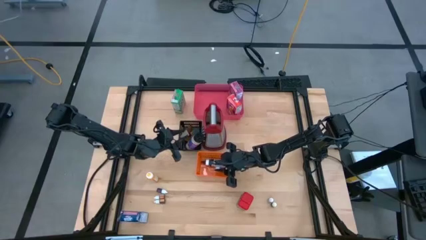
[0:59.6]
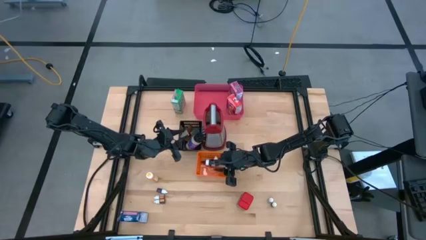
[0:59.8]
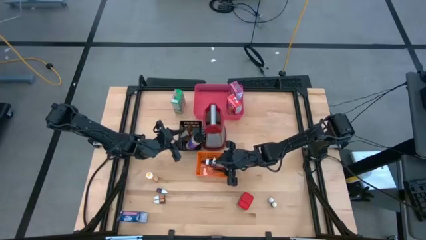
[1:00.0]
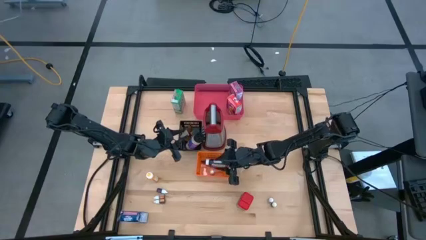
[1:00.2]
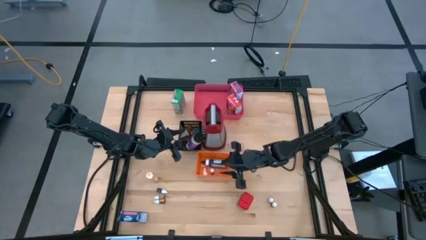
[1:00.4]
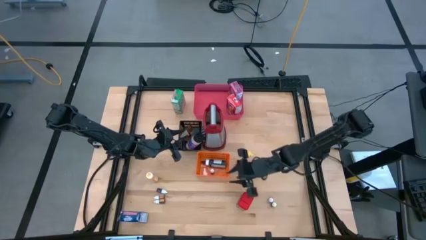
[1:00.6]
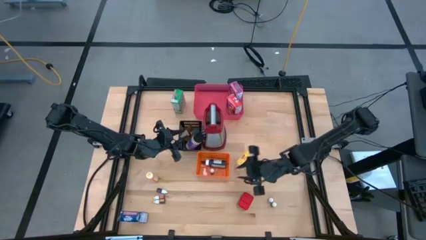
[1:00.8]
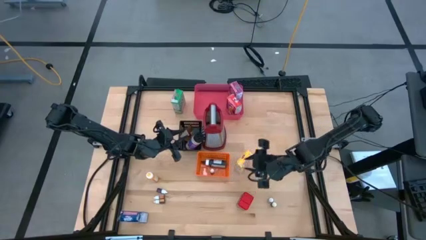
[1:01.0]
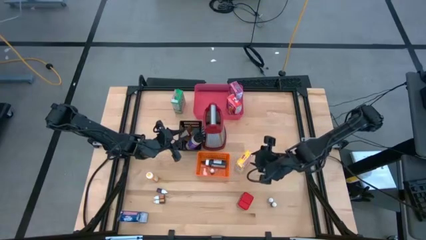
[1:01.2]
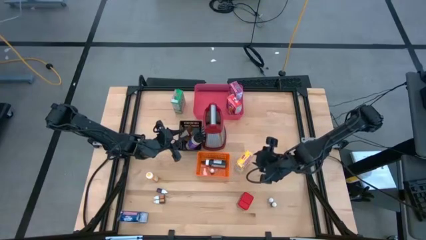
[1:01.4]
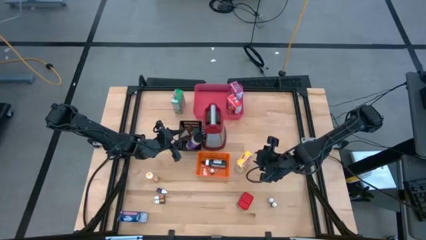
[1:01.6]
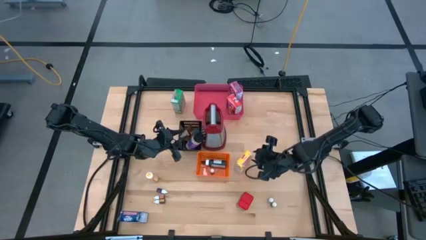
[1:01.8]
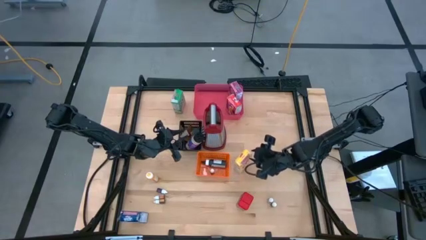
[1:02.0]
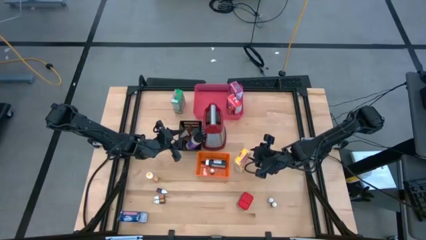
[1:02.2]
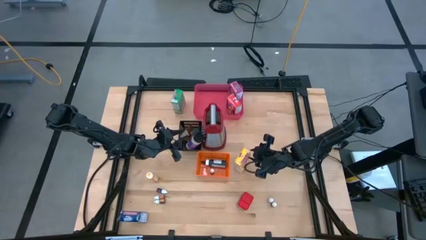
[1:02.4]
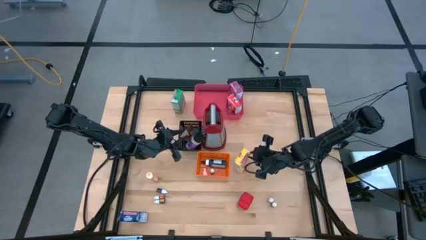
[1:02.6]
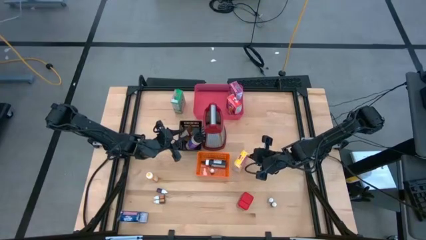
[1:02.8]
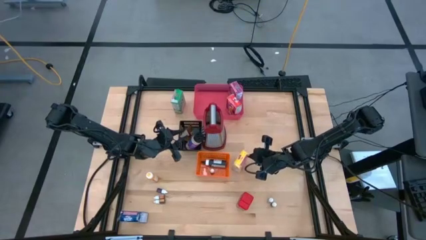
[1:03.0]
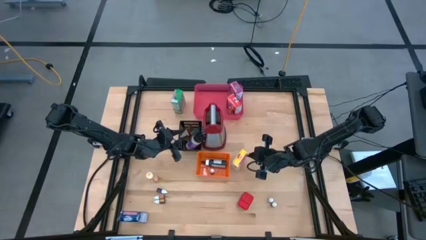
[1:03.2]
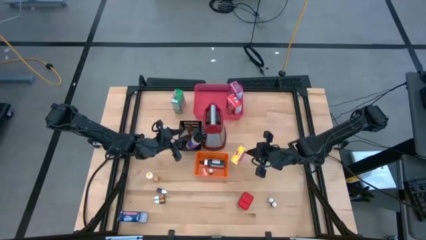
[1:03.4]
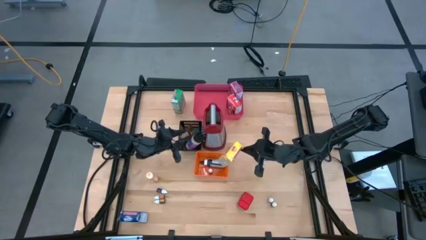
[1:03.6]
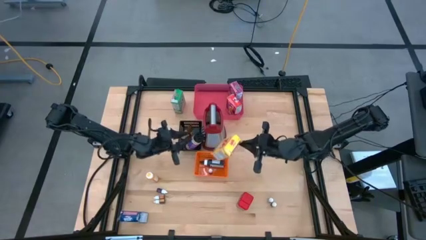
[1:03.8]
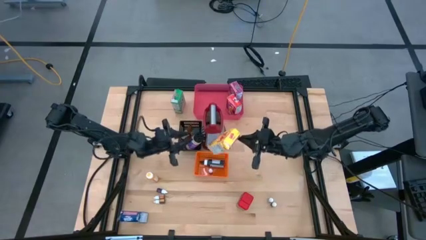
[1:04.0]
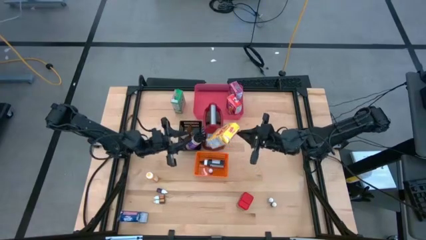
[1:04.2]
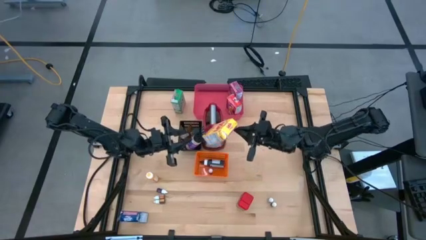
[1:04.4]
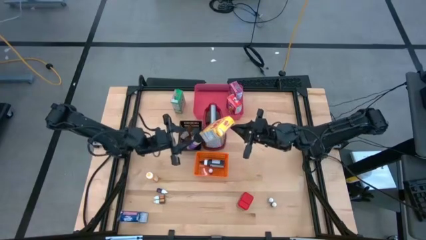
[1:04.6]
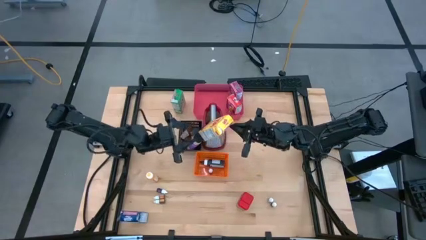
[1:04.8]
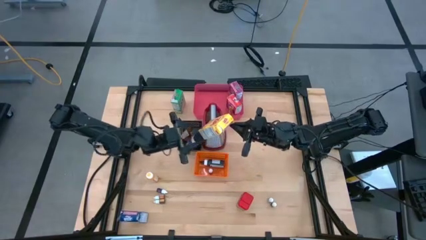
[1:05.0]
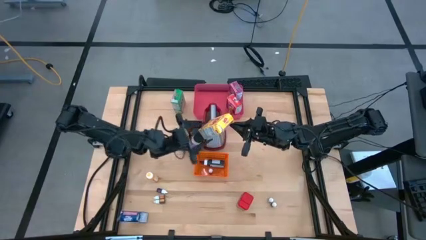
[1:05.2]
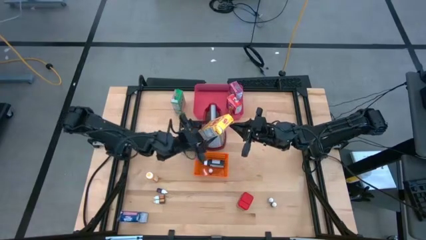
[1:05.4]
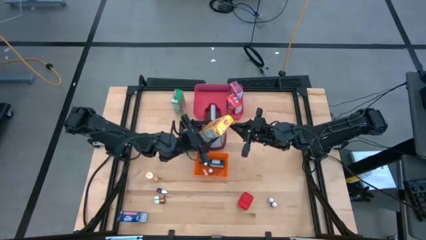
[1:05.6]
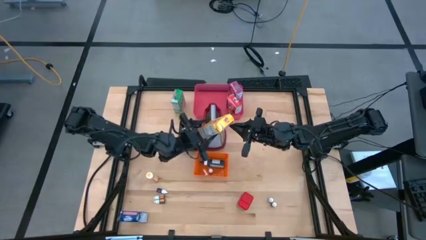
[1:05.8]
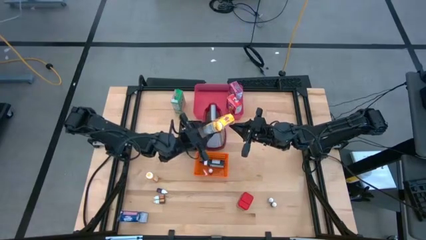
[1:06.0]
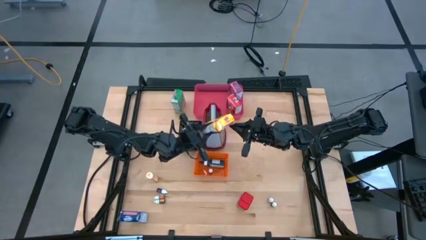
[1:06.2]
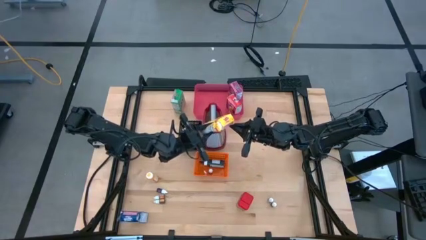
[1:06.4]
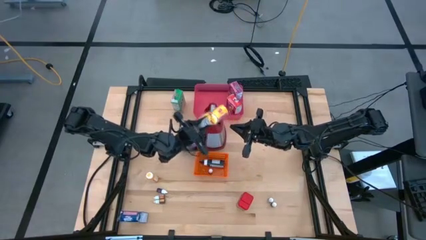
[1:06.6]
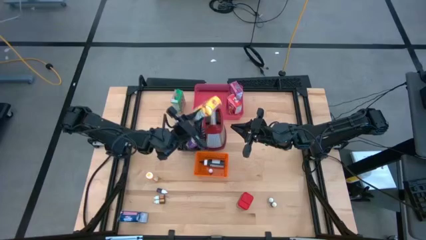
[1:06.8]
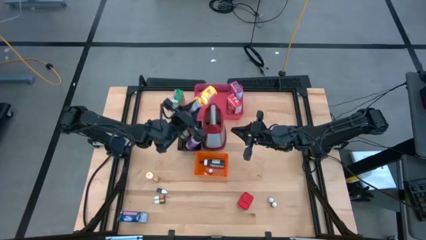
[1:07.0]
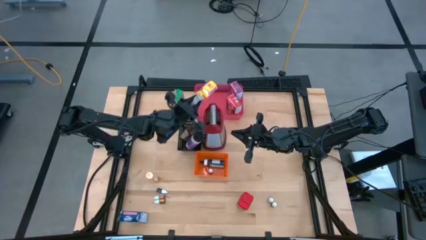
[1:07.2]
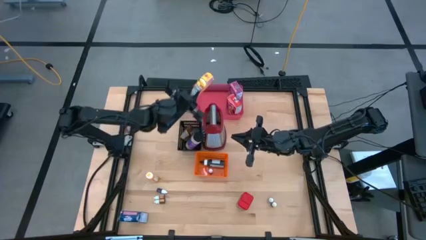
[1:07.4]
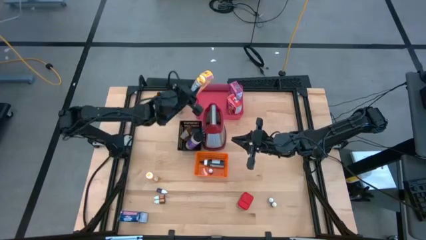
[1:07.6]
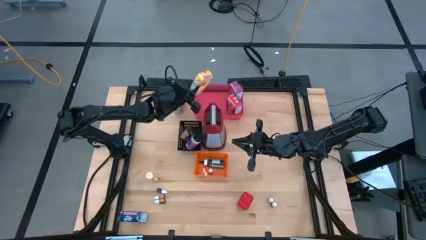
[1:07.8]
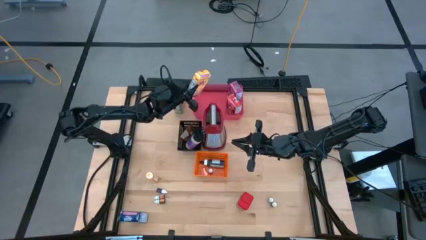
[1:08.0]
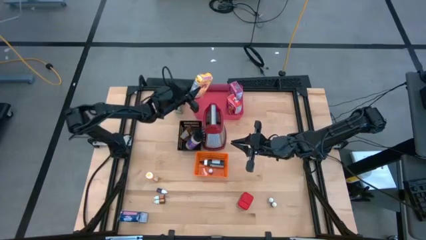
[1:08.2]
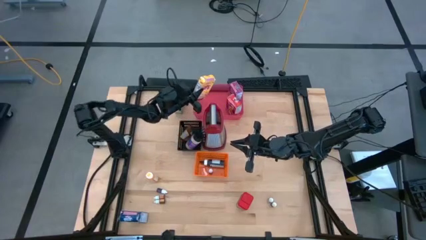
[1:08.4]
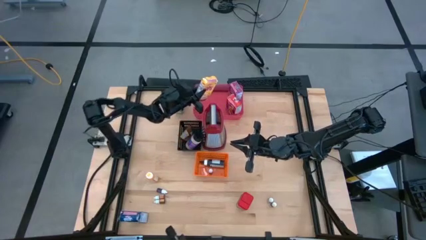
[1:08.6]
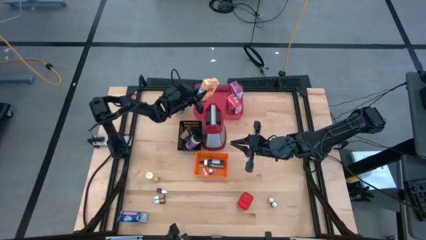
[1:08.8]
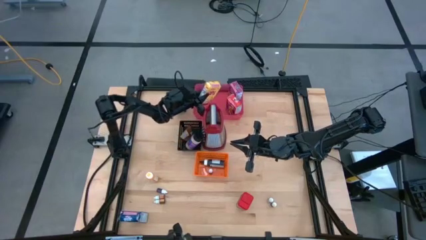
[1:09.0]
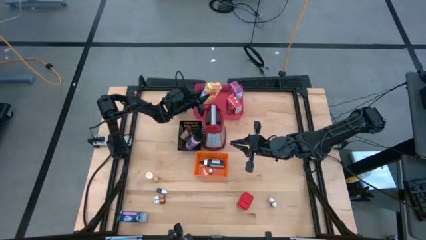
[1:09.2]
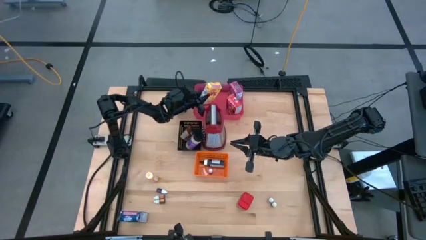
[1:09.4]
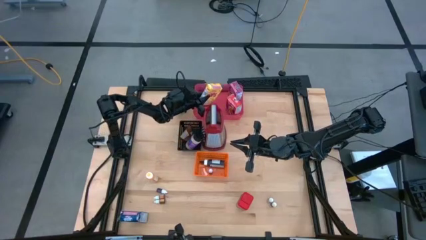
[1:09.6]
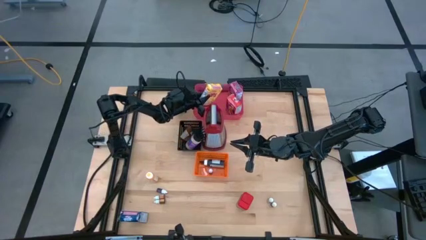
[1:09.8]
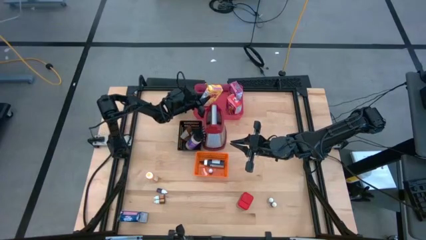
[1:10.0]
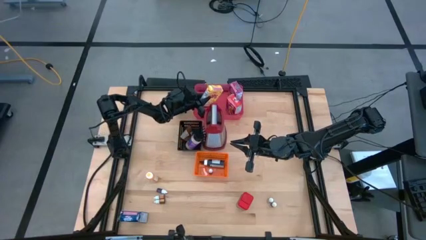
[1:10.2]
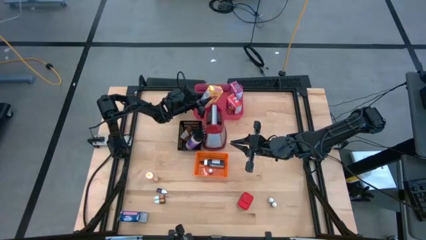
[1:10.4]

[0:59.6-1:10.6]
Task: Pick & Place Kitchen Items
Put the yellow cereal box into the pink bin

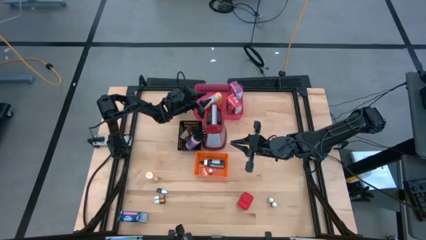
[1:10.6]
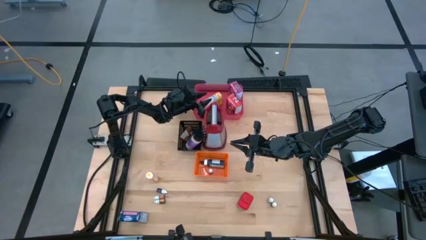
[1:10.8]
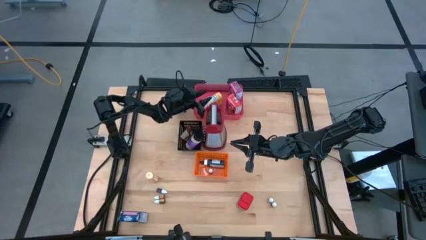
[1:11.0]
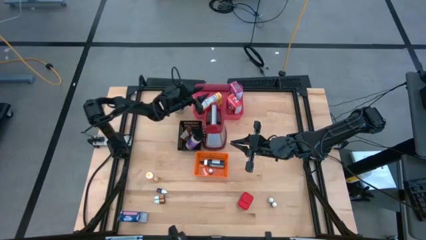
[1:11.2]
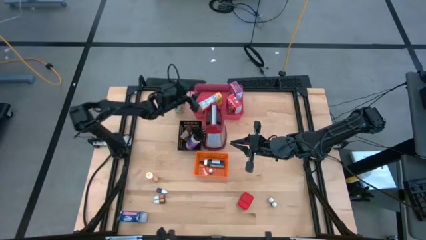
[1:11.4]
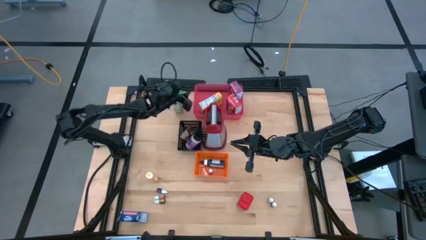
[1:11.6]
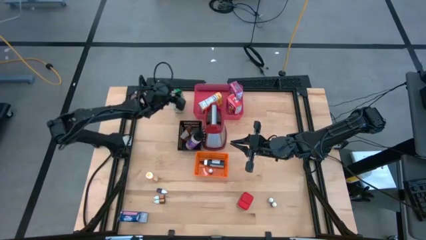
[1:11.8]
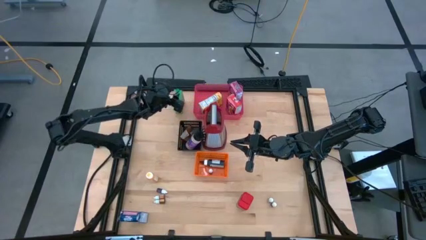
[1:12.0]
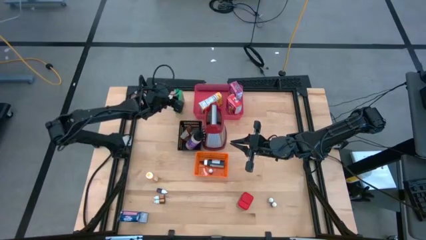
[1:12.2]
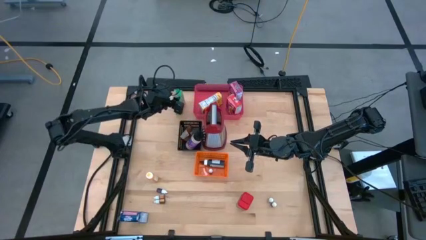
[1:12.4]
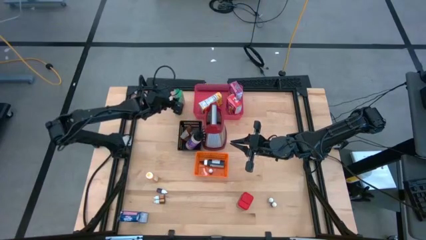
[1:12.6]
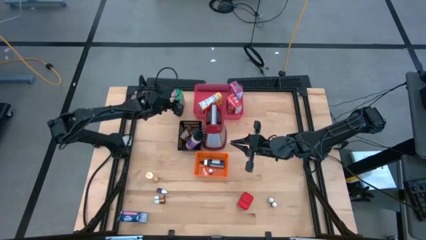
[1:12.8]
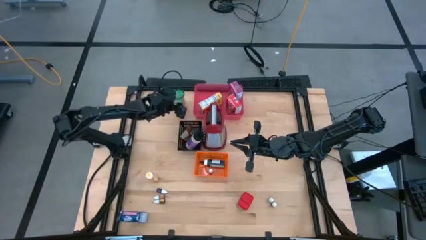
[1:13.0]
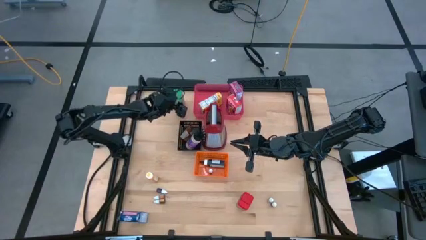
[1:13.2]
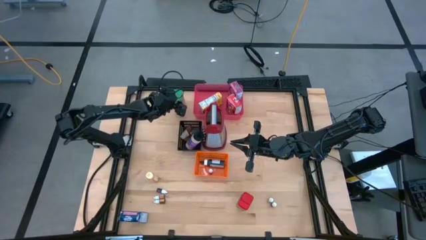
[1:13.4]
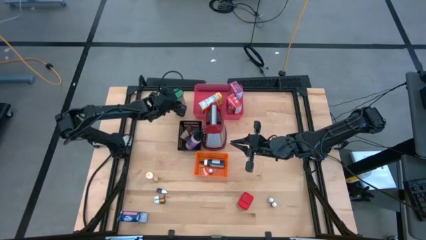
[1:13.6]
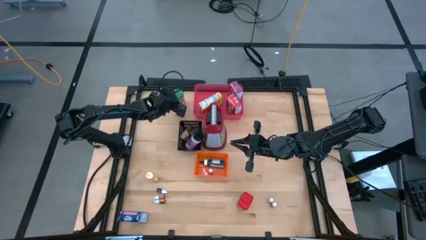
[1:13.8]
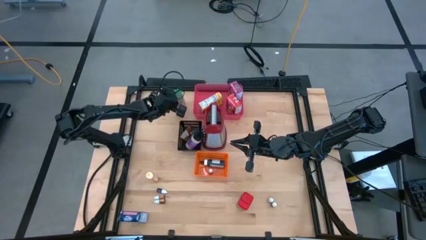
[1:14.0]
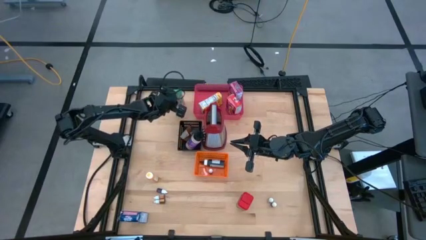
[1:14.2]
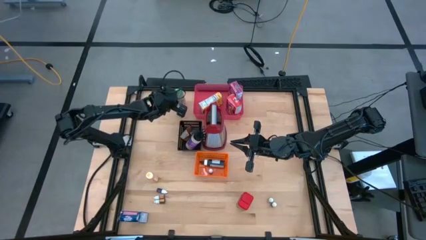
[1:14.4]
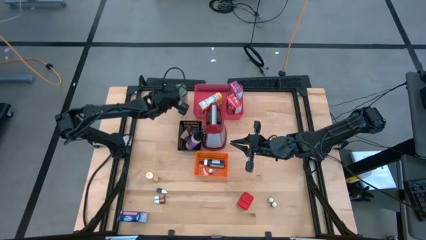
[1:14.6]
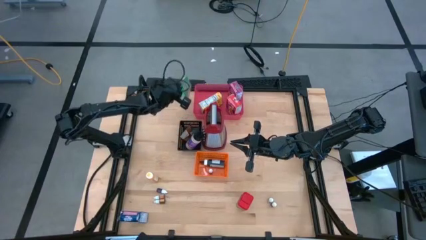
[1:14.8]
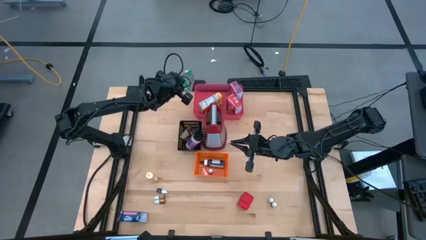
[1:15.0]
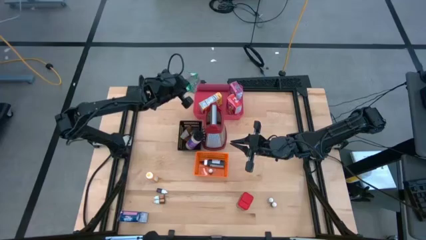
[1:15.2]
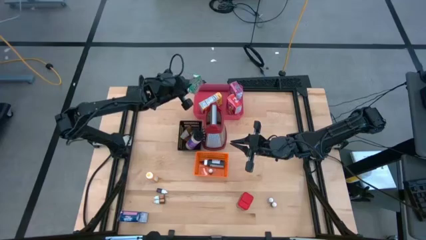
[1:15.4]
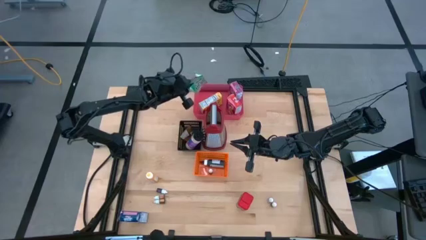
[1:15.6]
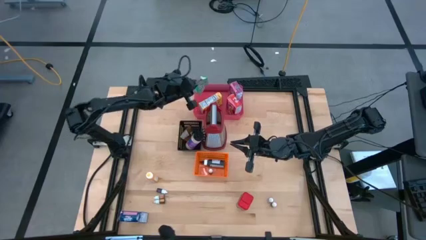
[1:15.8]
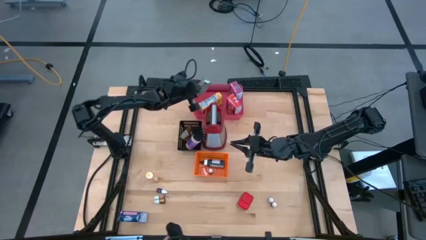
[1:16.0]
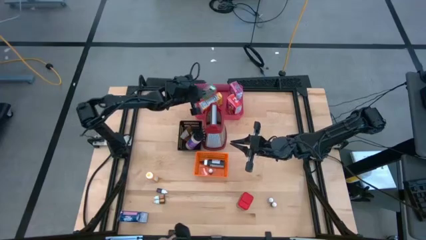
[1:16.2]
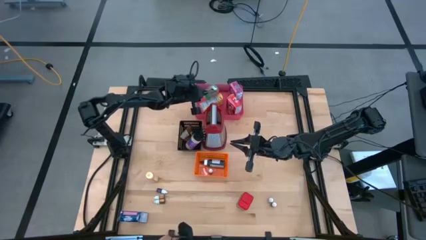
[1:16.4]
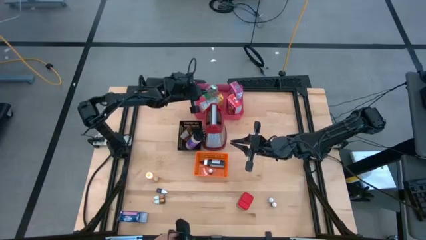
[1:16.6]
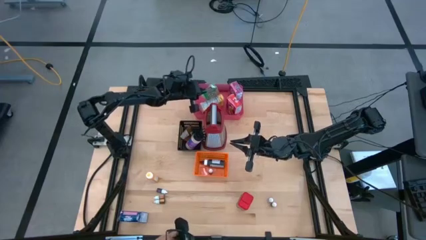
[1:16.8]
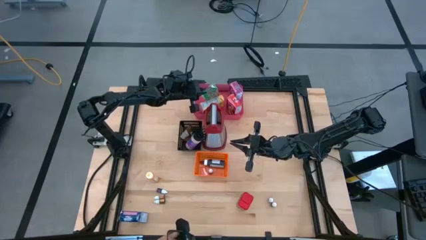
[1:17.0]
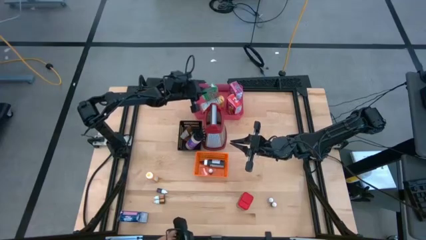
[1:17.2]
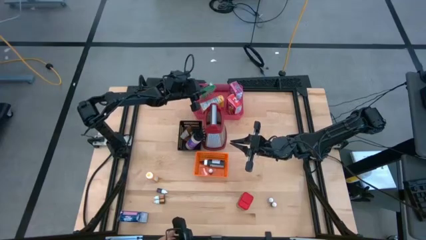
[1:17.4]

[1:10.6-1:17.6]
Put the green cereal box into the pink bin
